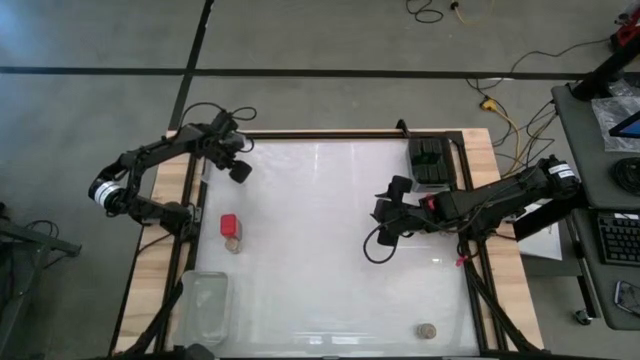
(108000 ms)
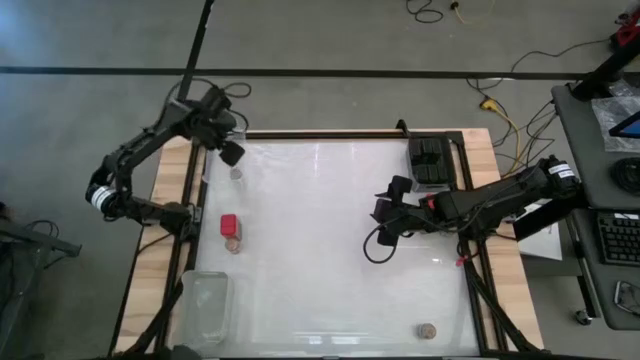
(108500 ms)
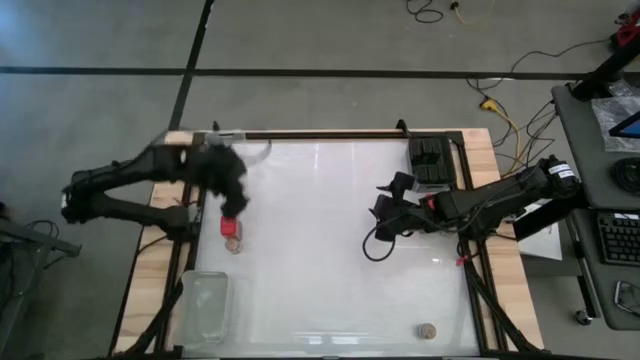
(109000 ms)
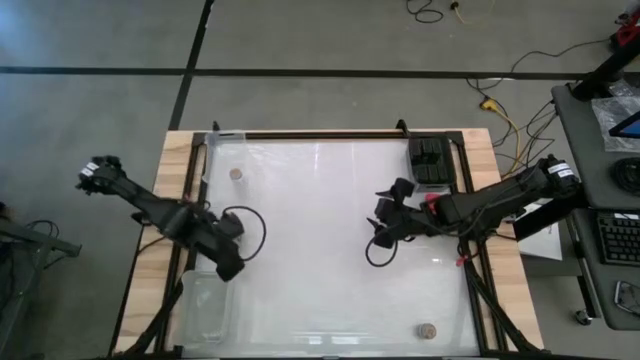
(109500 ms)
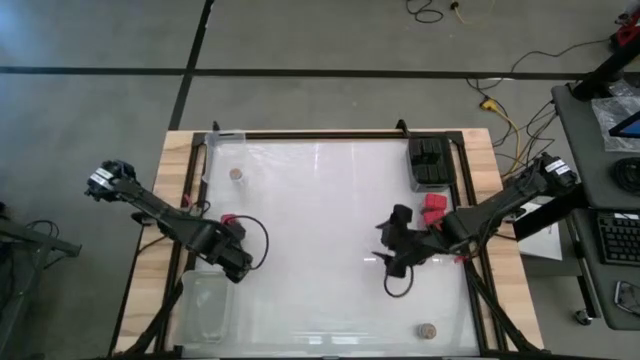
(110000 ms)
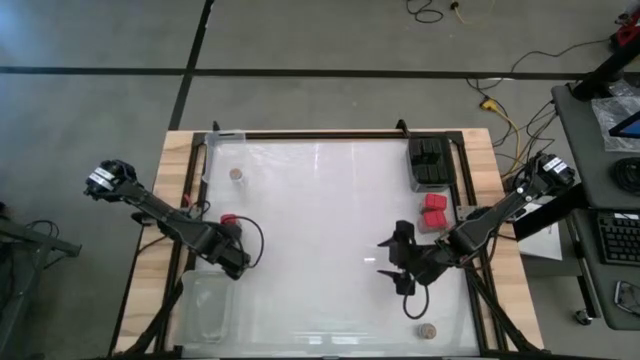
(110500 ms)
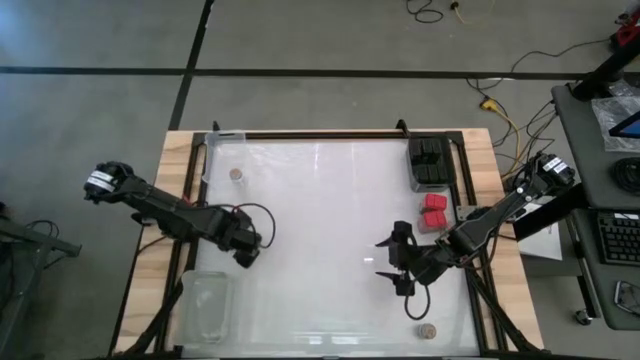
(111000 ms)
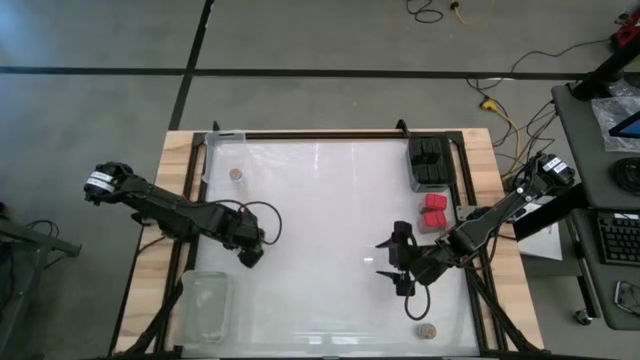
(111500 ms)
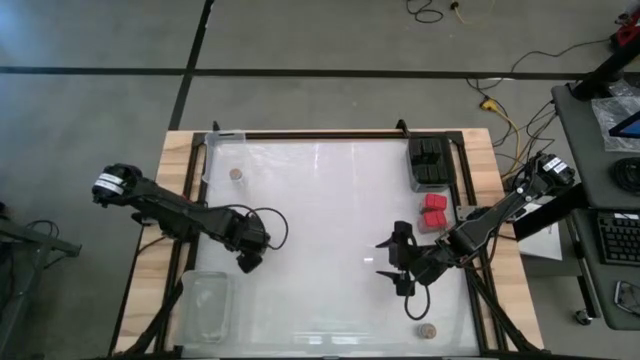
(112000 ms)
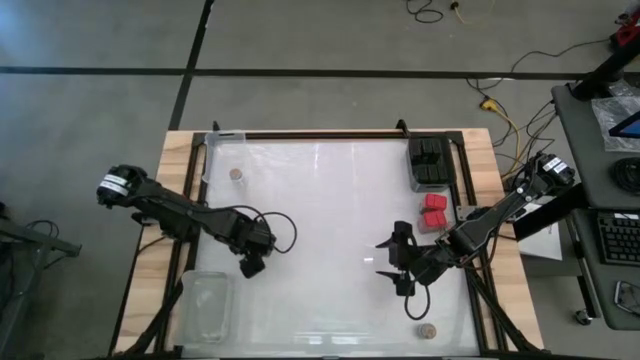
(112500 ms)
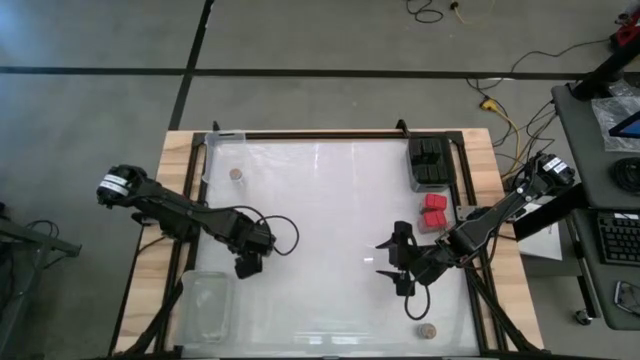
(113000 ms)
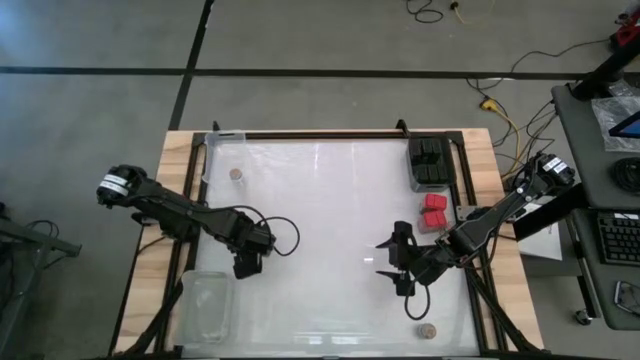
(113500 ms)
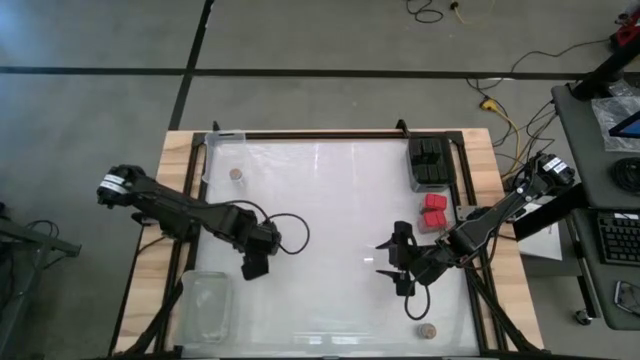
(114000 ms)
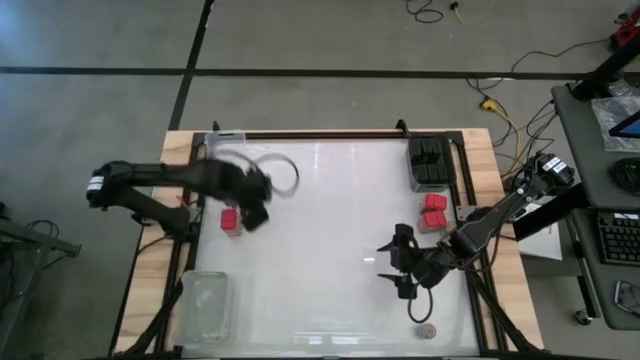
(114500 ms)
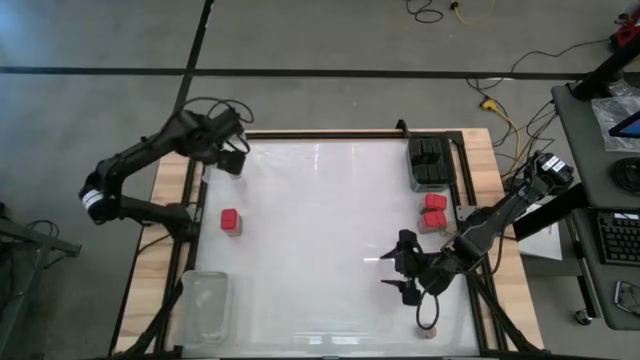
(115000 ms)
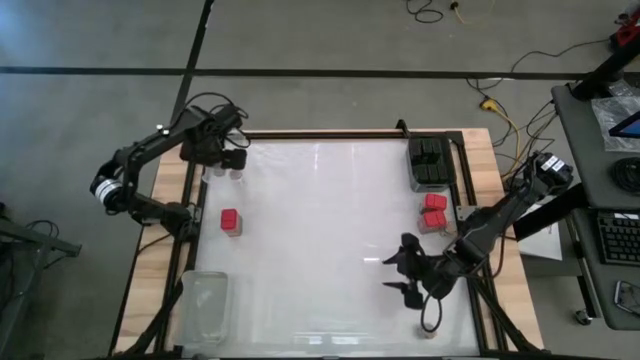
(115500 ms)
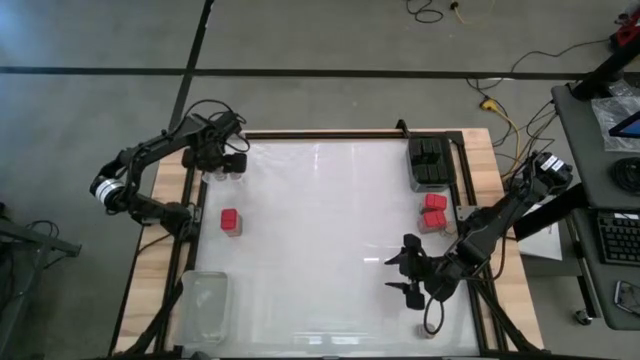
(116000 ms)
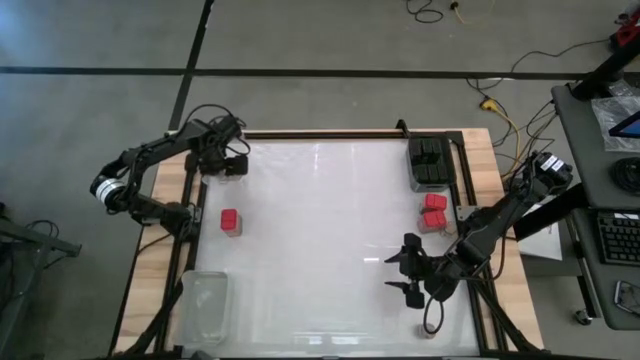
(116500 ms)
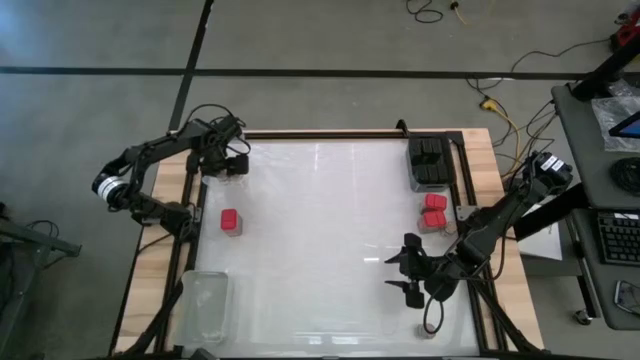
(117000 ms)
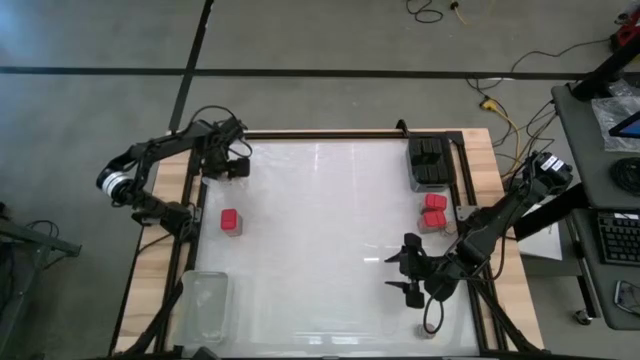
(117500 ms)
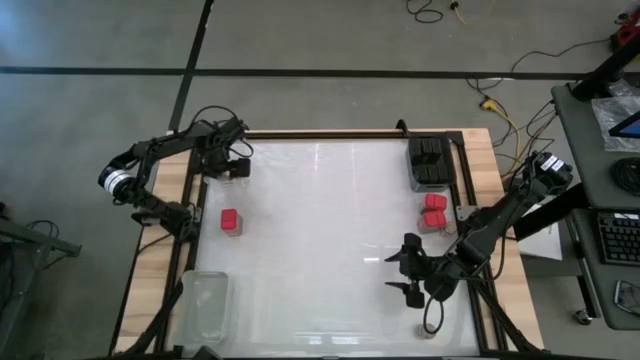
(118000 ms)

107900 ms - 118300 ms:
Task: Sort spices by type
Put the brown seasoning bottle into the transparent bin

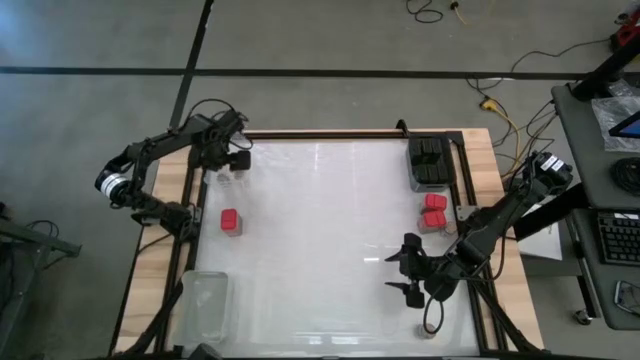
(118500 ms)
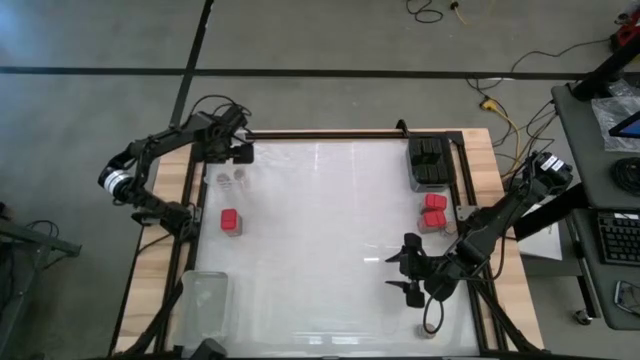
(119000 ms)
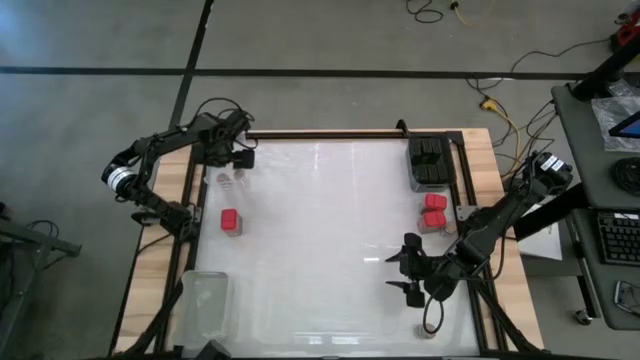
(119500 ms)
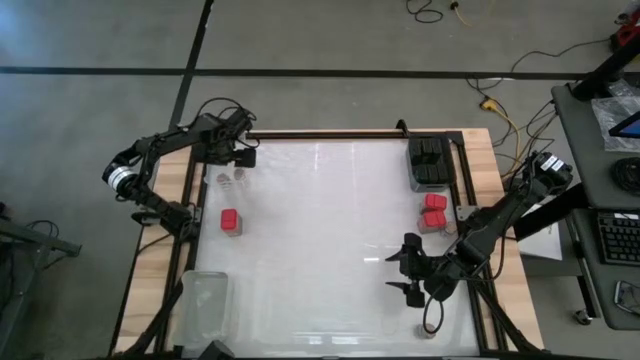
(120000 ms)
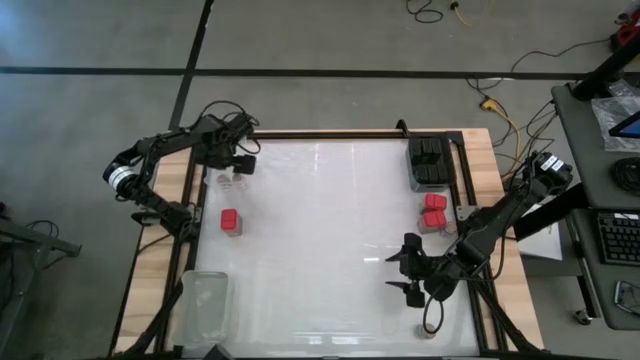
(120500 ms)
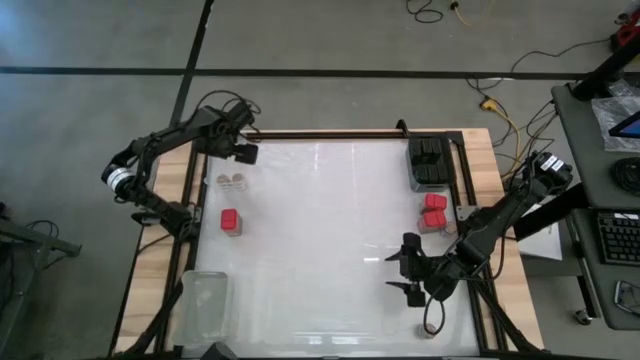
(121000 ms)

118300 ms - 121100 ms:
Adjust the brown seasoning bottles in the transparent bin

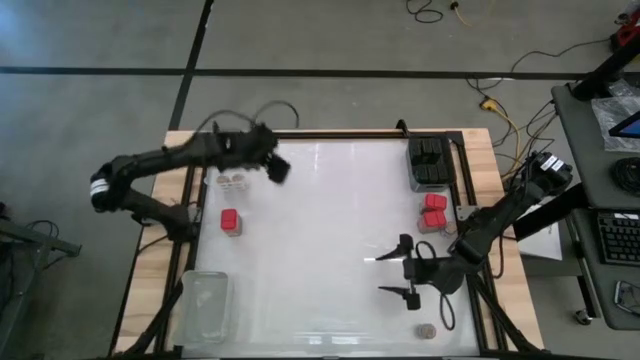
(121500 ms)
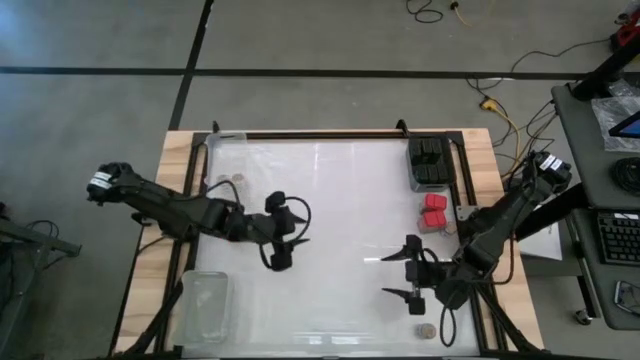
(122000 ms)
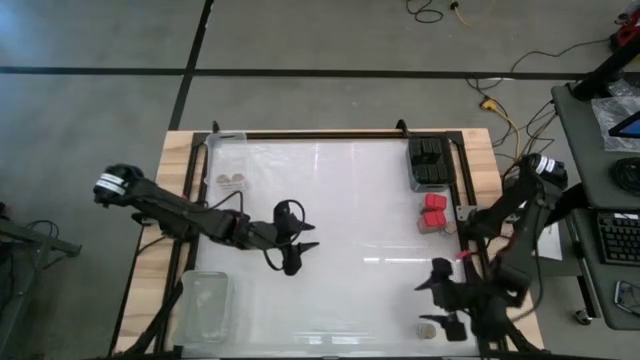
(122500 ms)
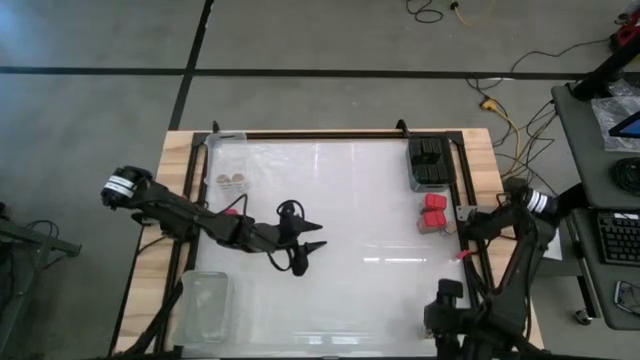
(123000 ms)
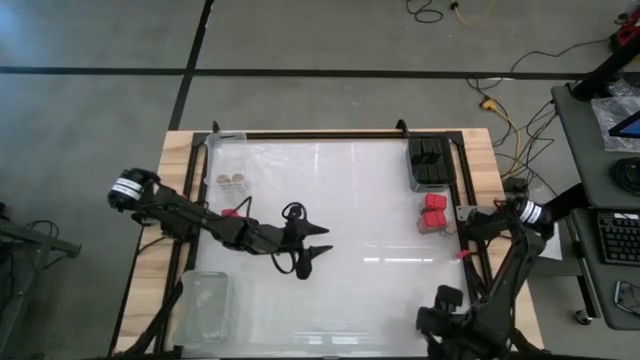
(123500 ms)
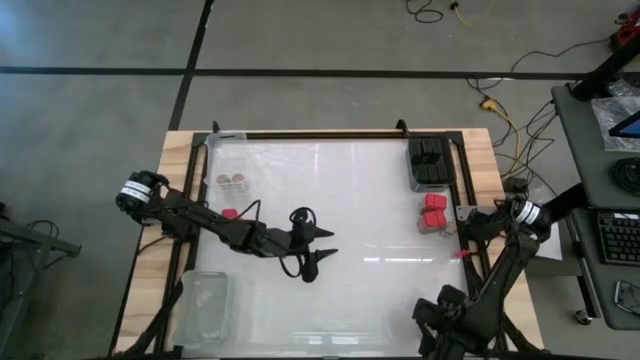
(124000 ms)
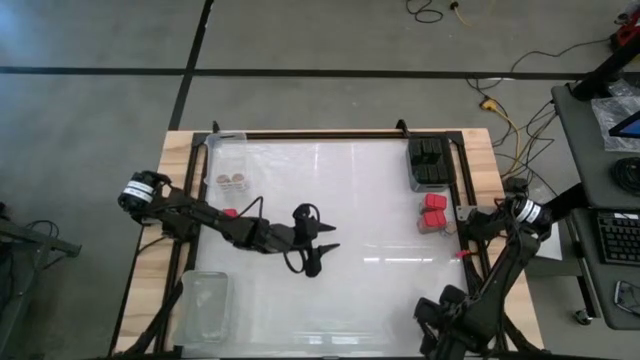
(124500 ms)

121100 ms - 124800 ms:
Put the brown seasoning bottle into the transparent bin

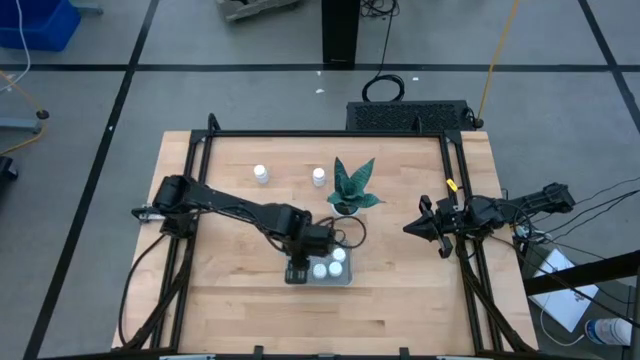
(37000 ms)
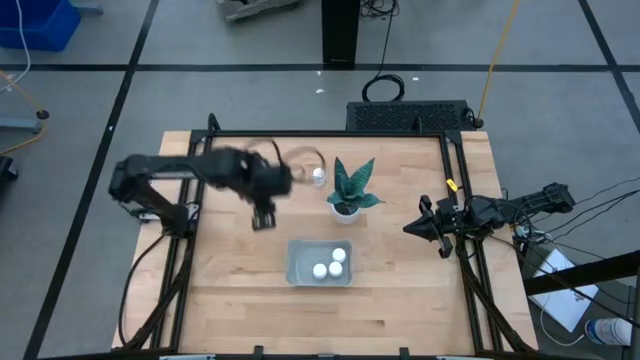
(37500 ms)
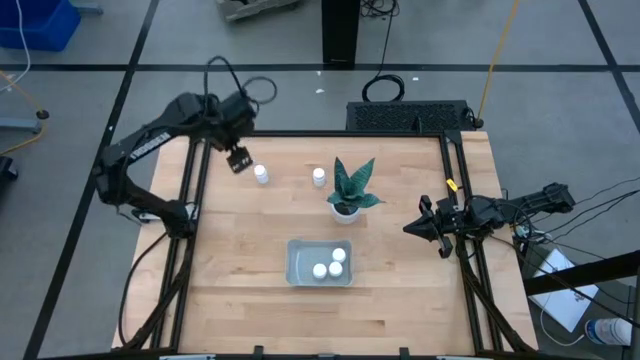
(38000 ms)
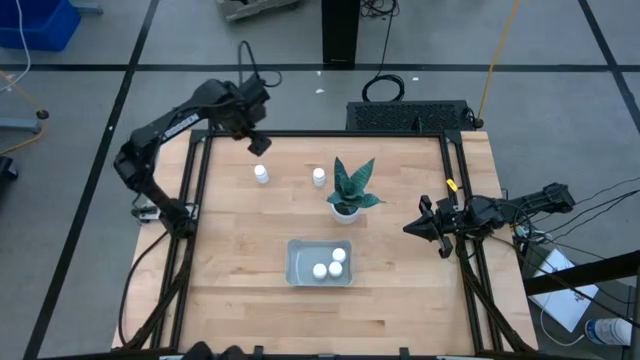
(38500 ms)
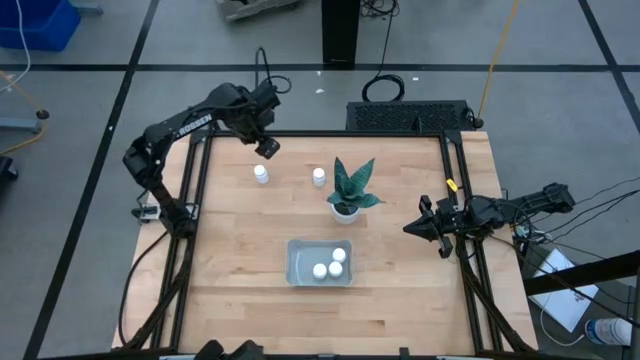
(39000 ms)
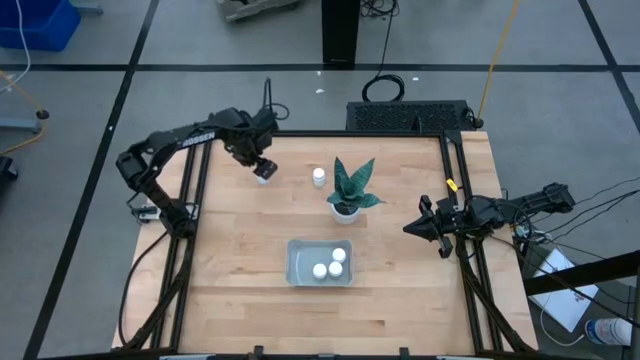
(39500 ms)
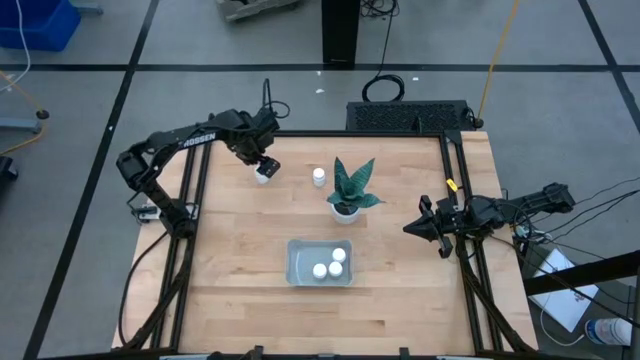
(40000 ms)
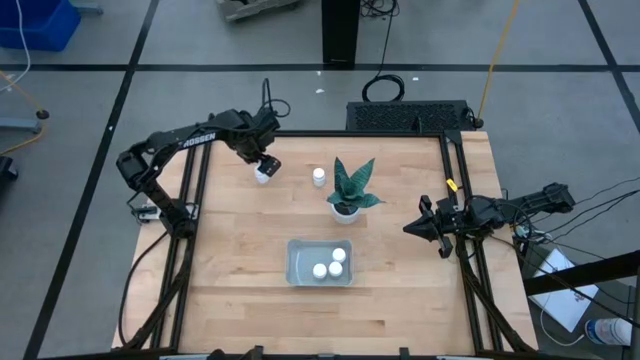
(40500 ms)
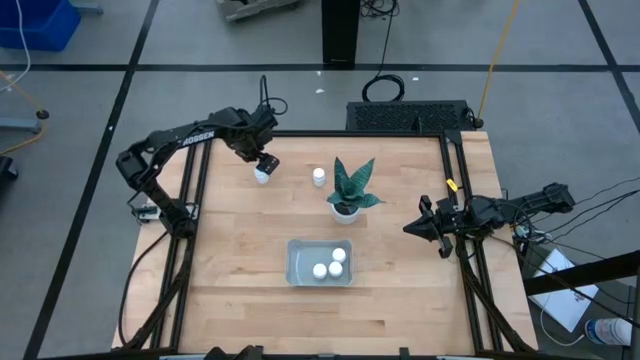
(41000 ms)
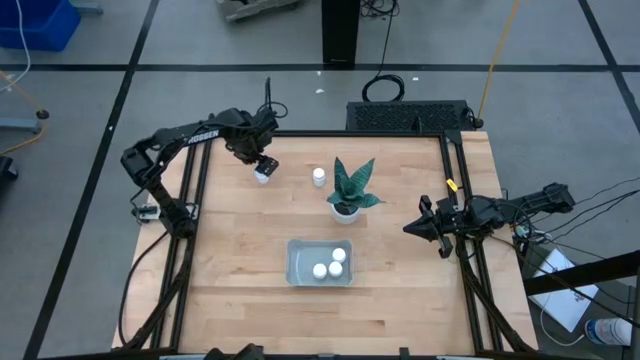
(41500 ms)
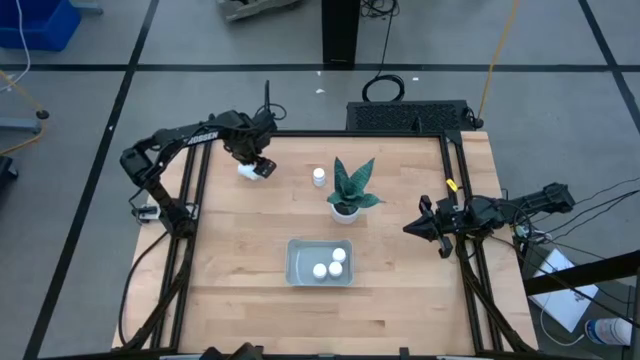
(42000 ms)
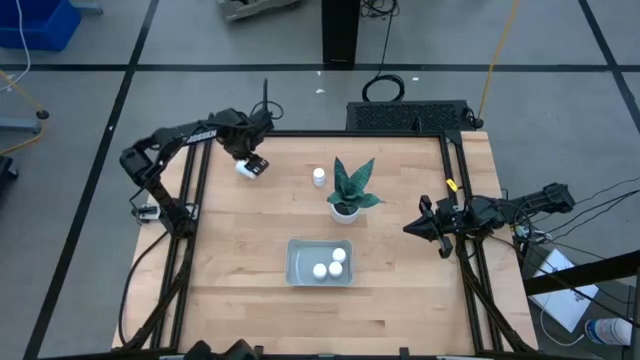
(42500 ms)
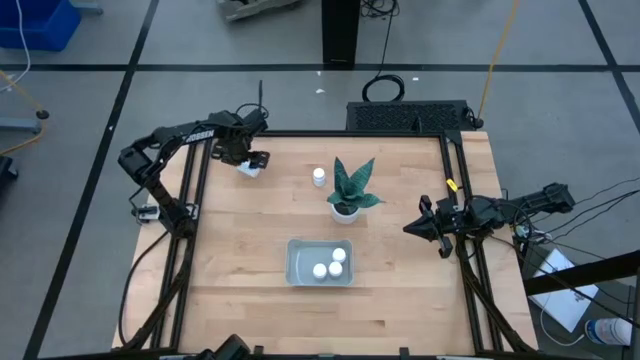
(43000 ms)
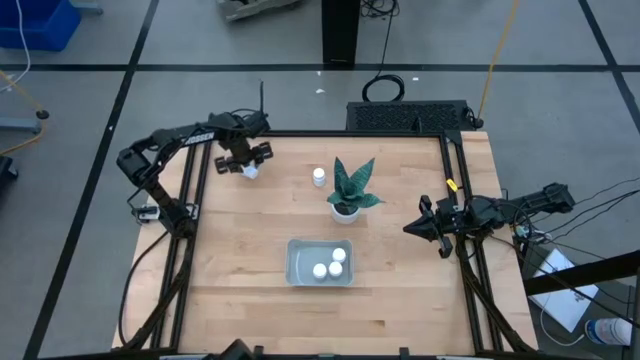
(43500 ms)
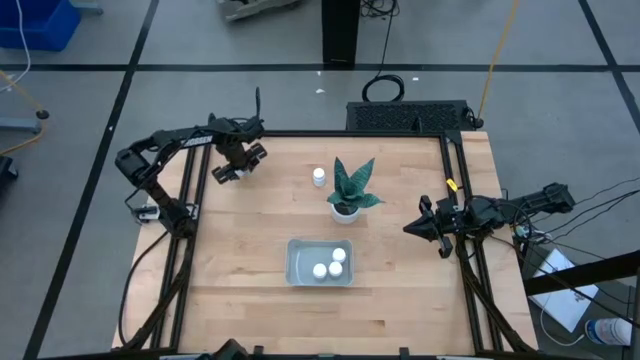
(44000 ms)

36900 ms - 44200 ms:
Task: Pick and place pill bottles into a basket
Put the white pill bottle into the white bin
